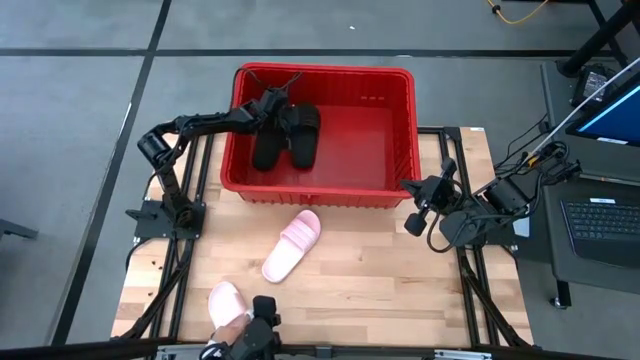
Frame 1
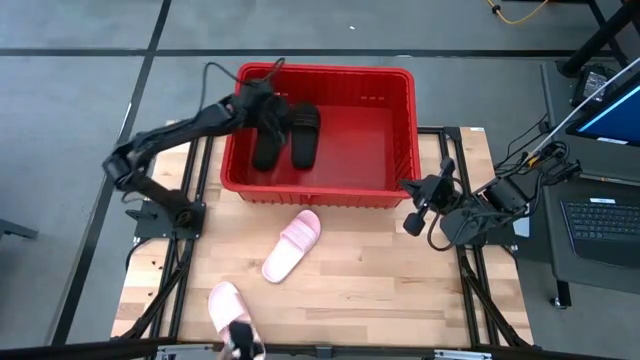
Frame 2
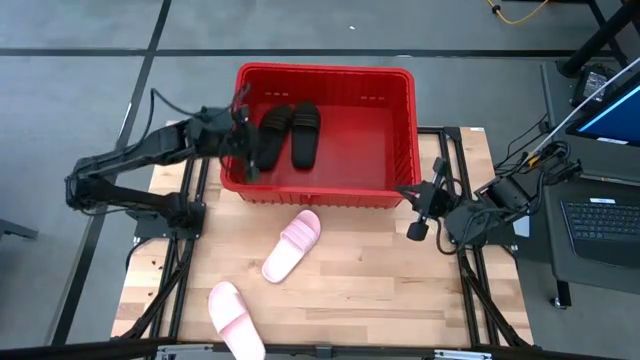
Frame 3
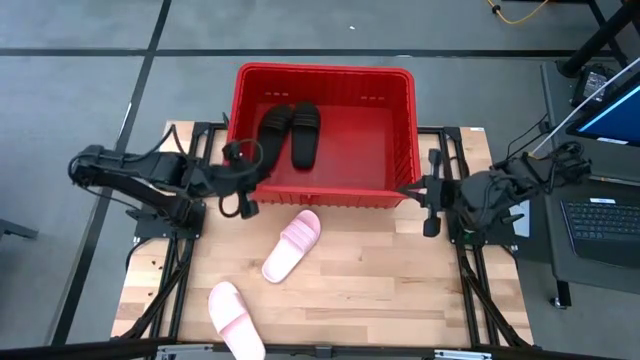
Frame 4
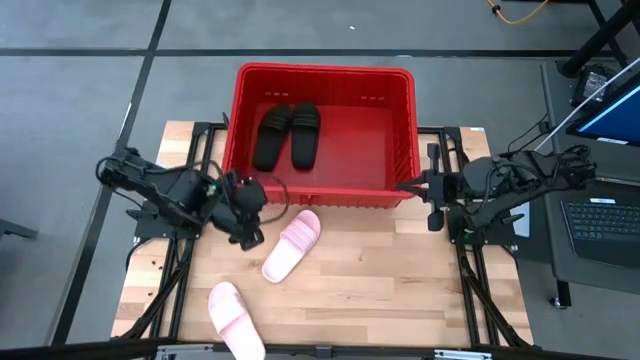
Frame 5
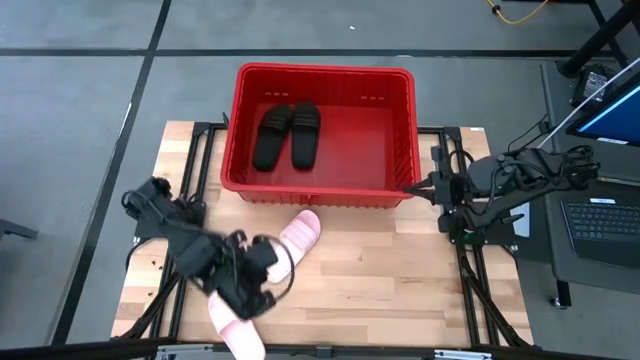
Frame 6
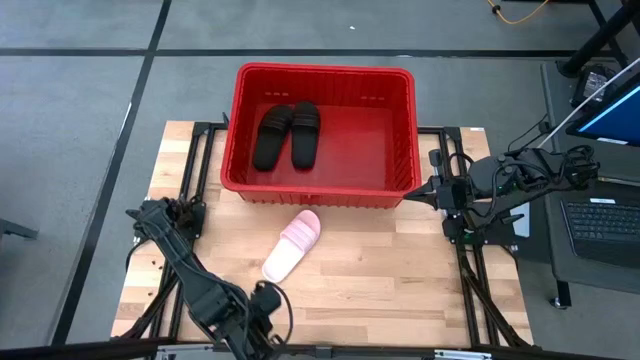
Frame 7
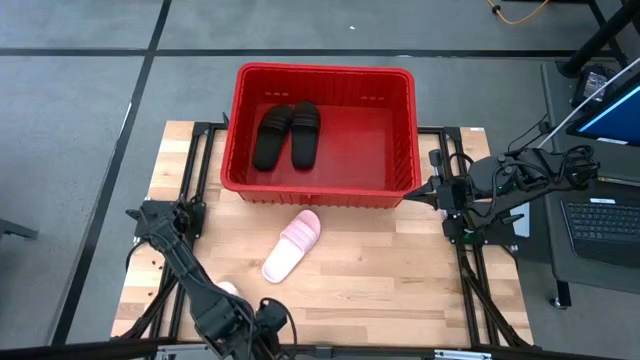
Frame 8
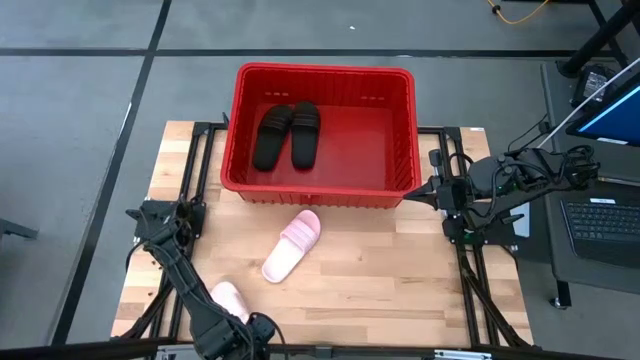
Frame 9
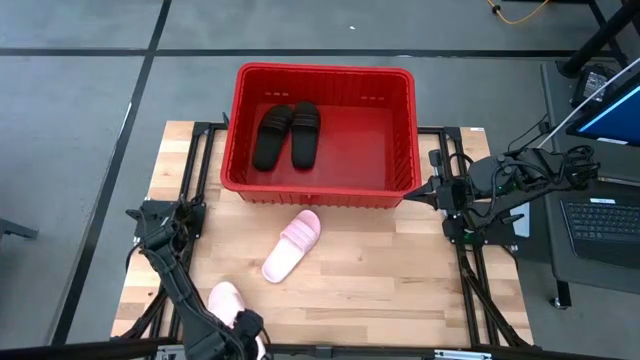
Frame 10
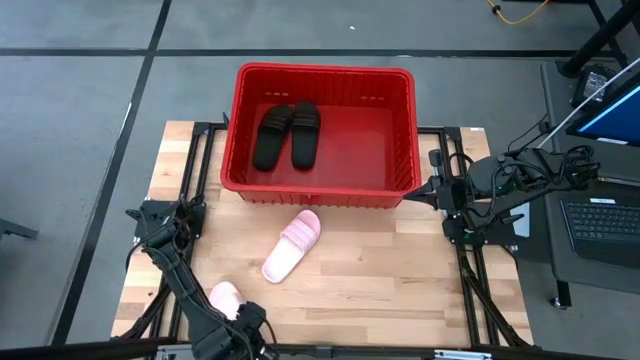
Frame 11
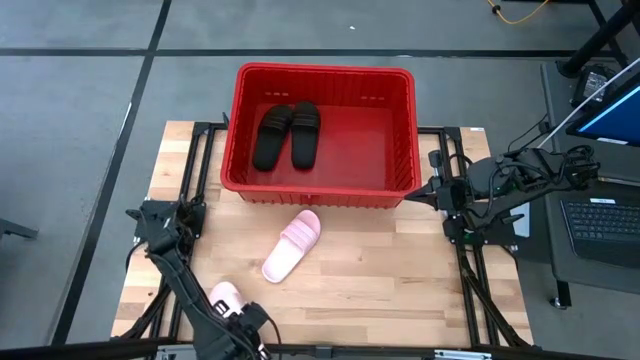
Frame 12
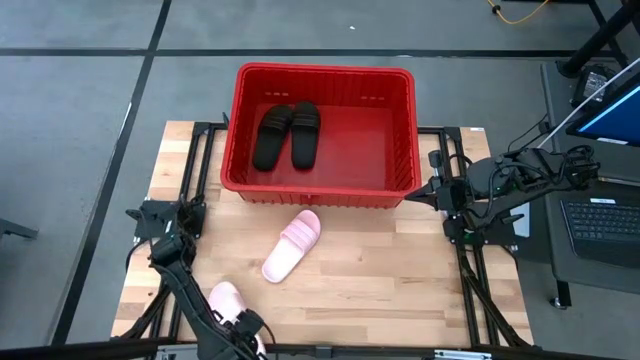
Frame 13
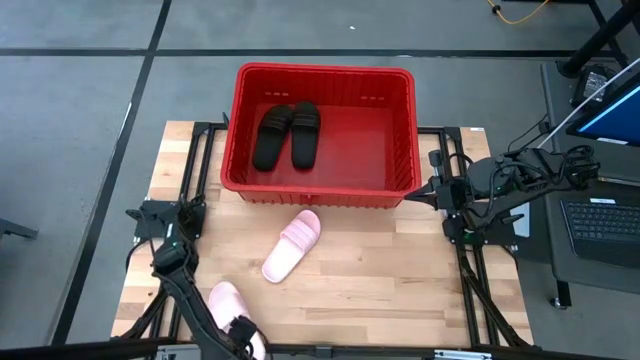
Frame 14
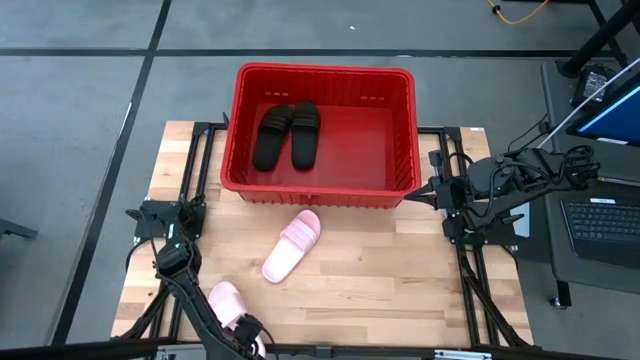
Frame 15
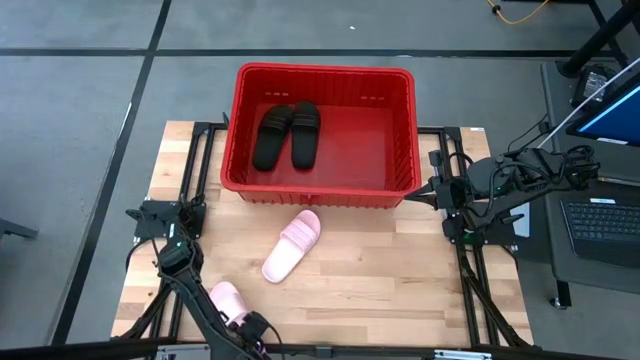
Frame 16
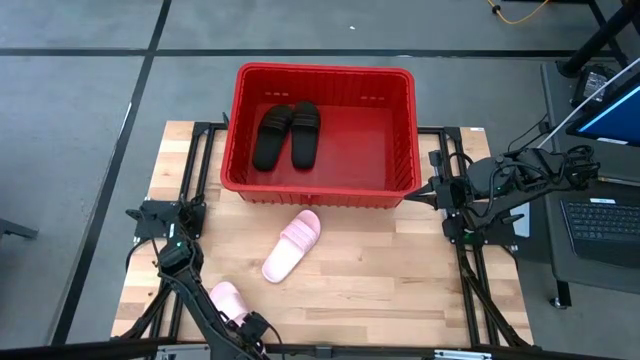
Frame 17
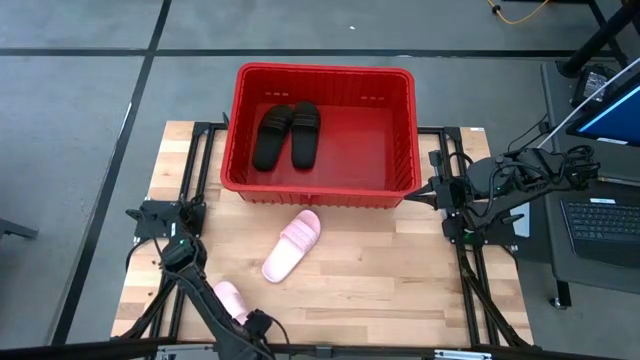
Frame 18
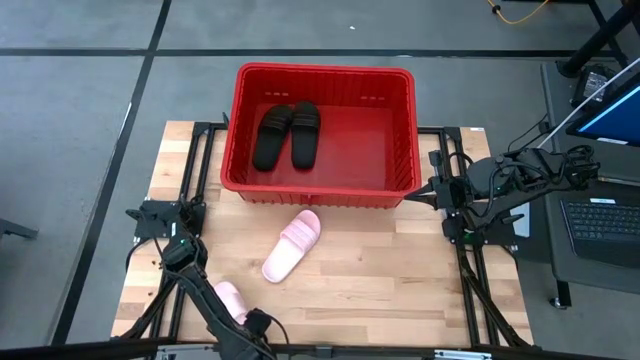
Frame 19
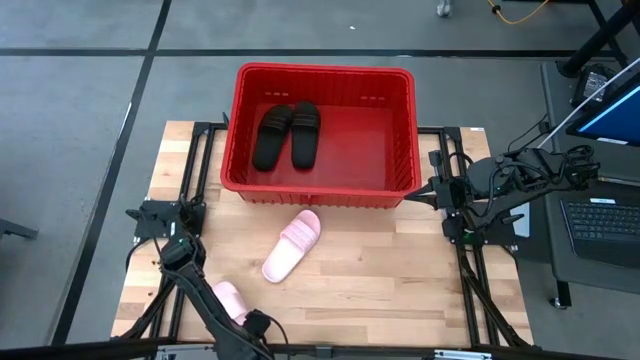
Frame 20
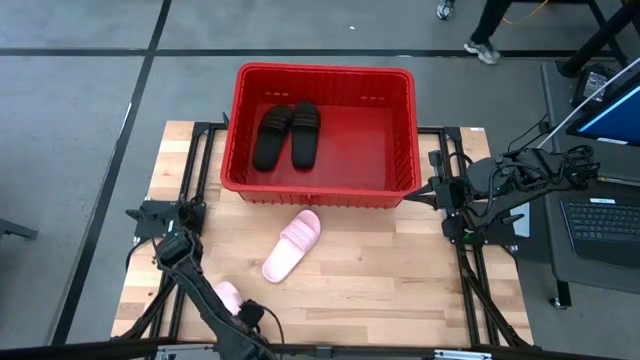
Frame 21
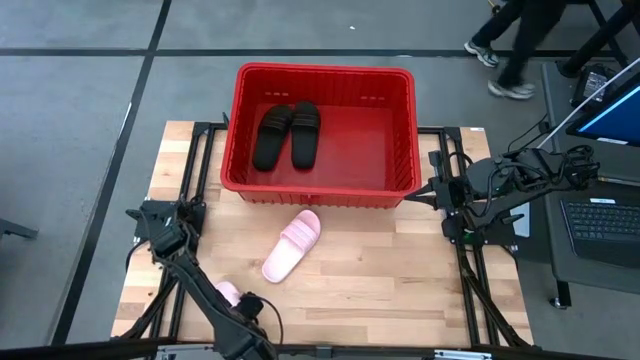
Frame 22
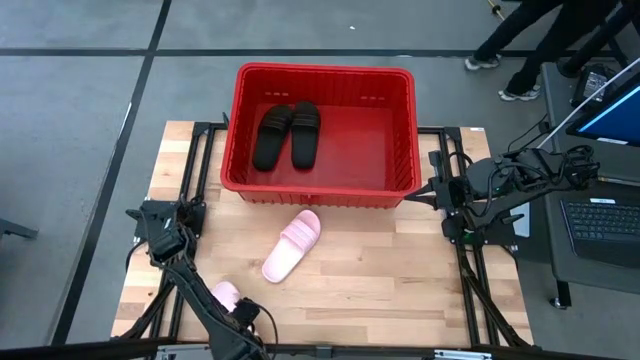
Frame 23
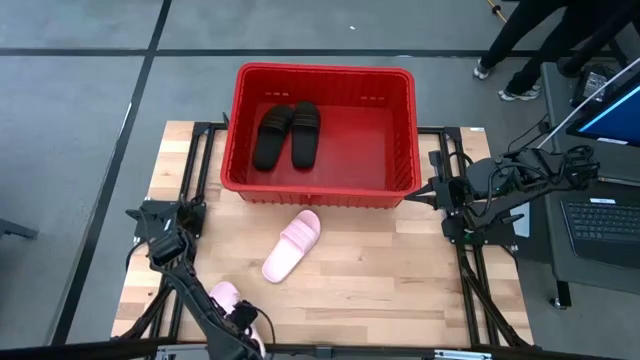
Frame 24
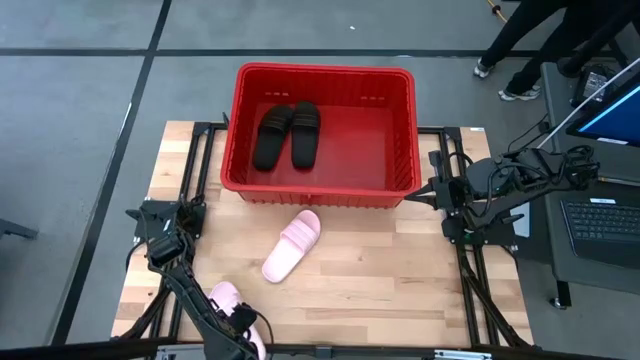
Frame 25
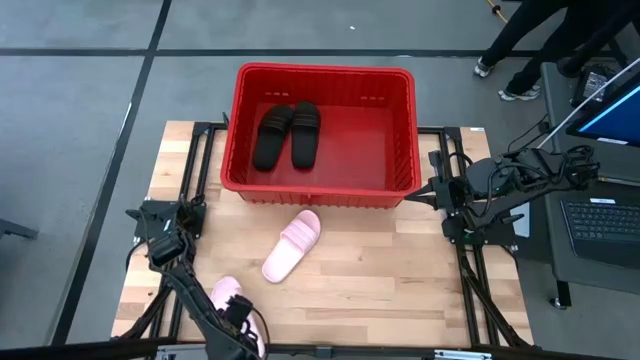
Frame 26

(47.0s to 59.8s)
Task: Pick and place slides into bin
Put the left pink slipper into the red bin

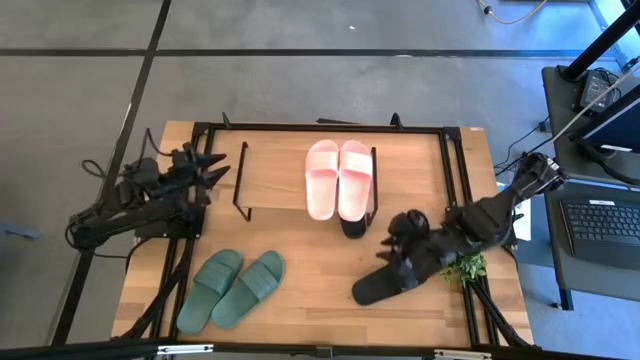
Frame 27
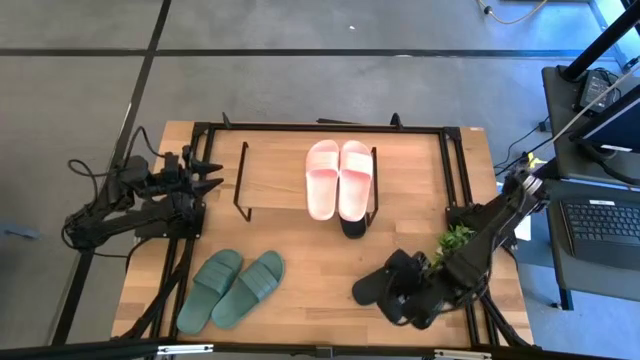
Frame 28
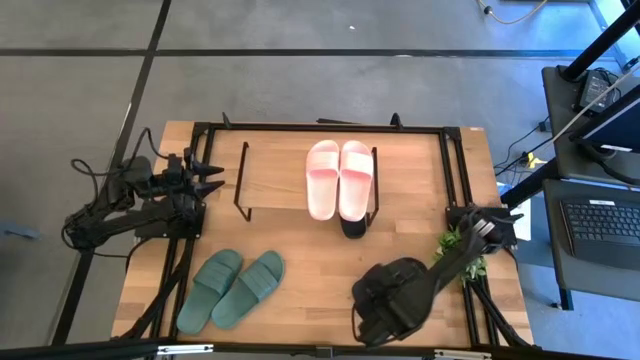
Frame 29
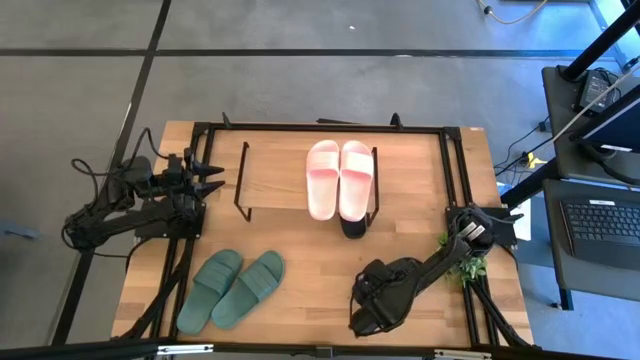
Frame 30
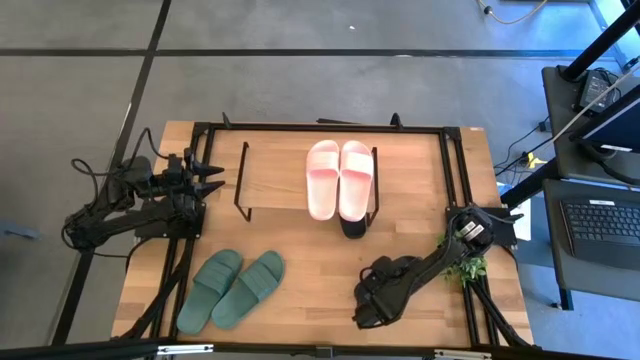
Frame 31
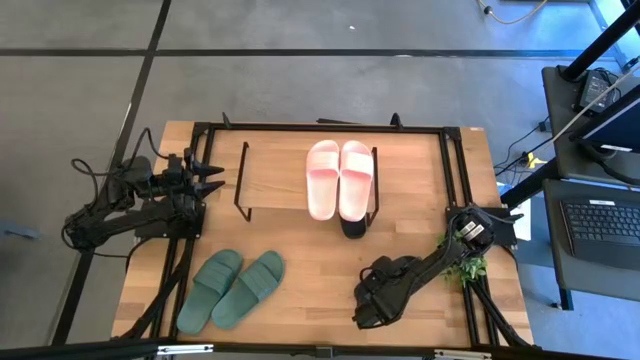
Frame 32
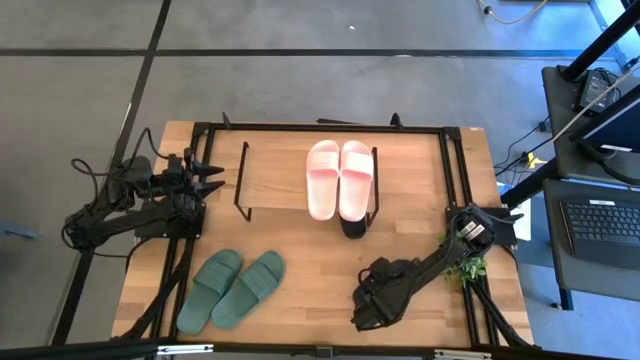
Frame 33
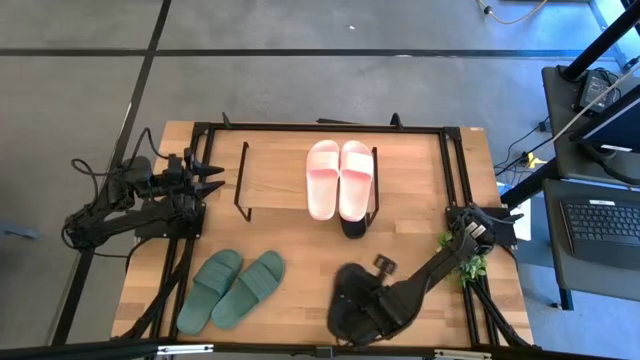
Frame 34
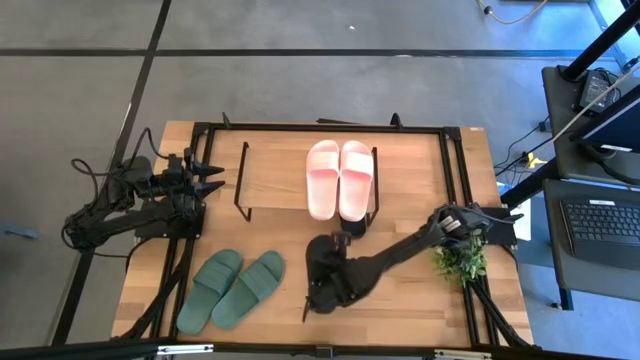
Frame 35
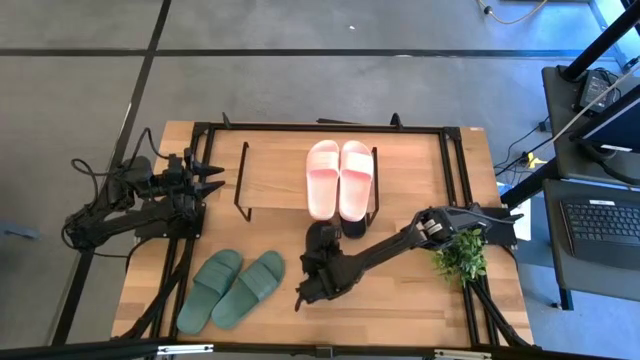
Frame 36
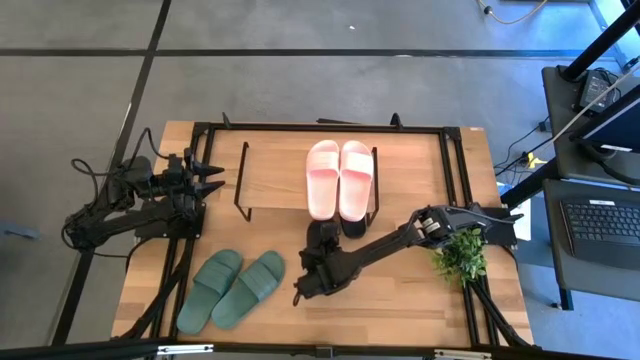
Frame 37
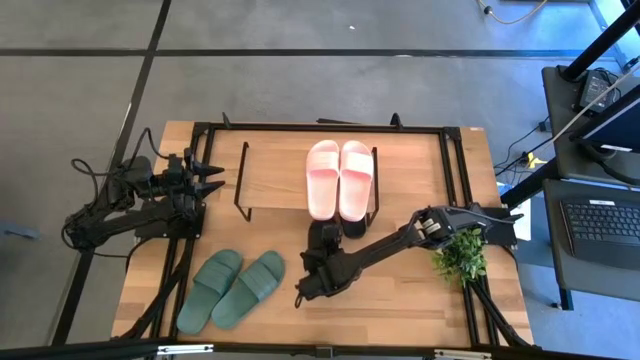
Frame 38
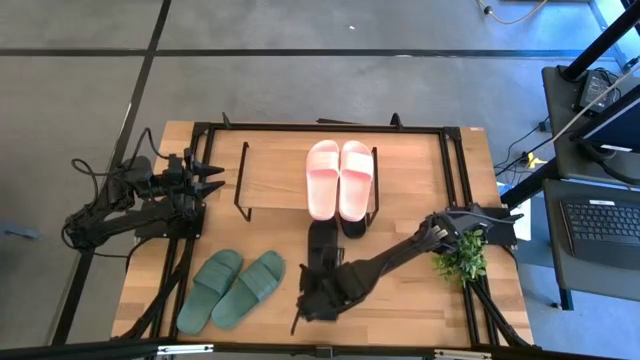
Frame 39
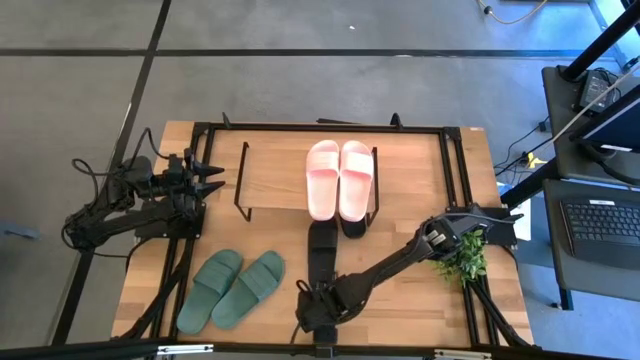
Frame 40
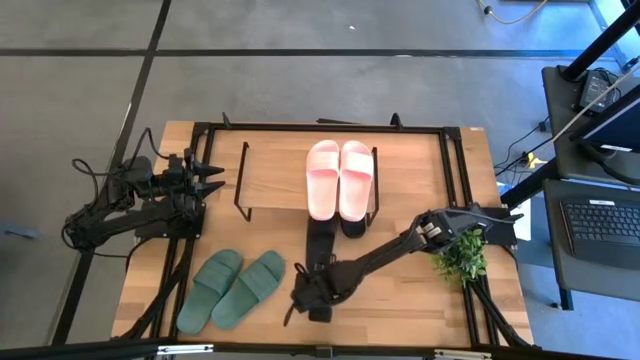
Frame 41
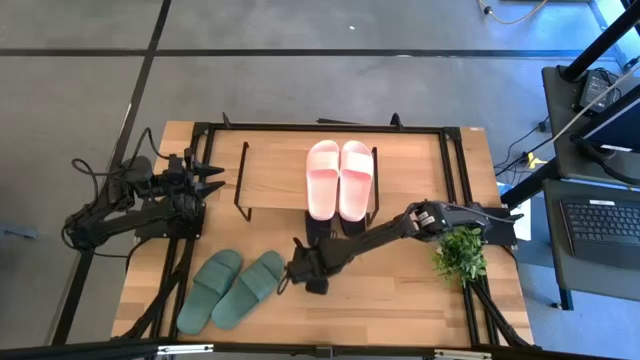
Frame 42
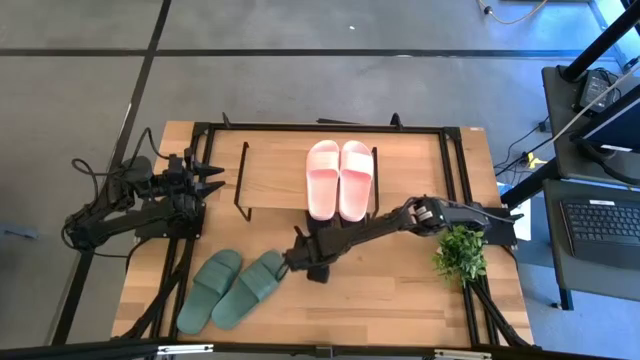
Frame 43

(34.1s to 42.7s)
Task: Pick and place slides into the shelf
Put the back slide under the shelf
